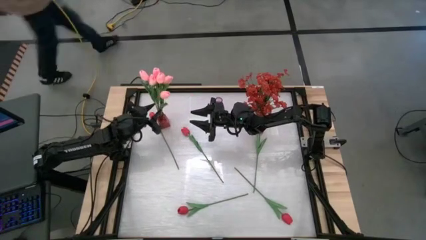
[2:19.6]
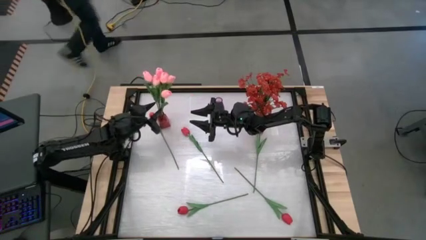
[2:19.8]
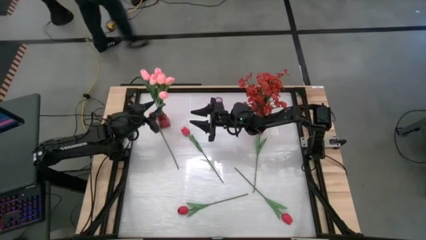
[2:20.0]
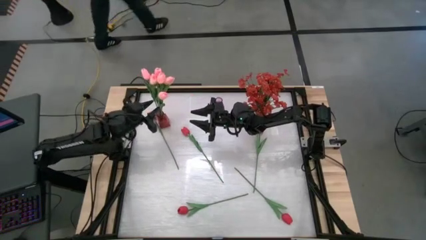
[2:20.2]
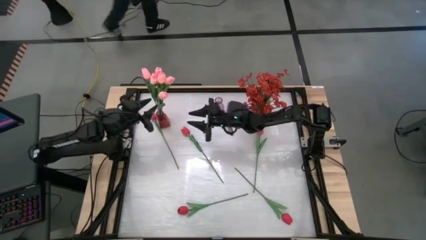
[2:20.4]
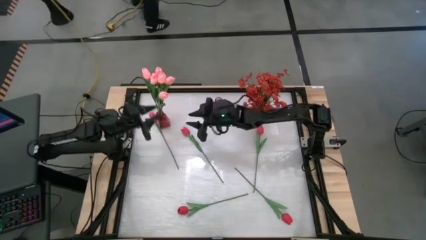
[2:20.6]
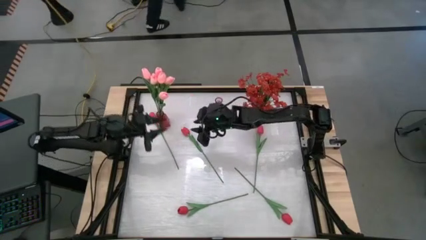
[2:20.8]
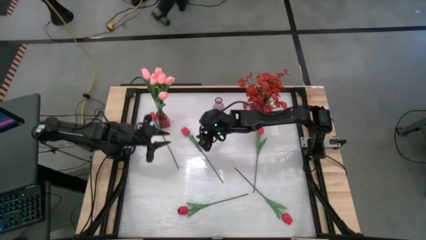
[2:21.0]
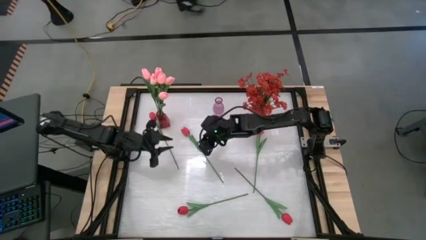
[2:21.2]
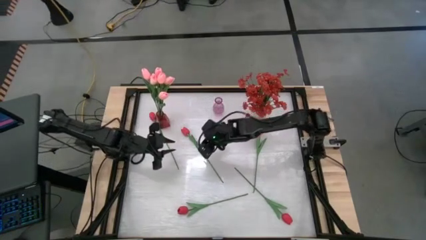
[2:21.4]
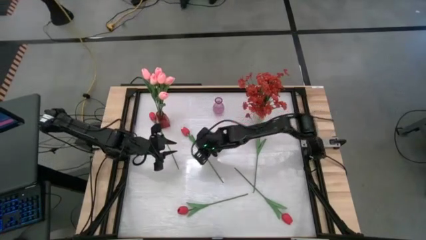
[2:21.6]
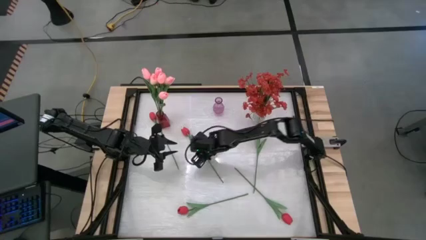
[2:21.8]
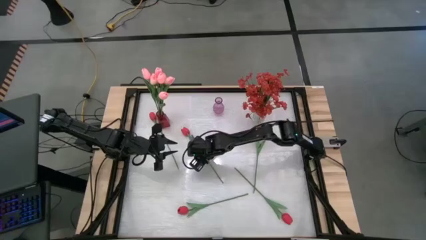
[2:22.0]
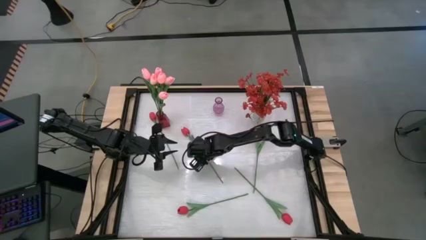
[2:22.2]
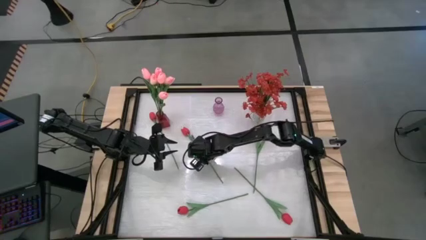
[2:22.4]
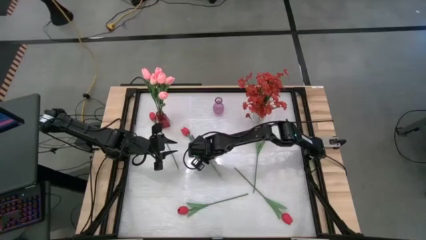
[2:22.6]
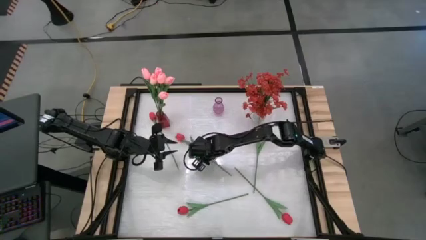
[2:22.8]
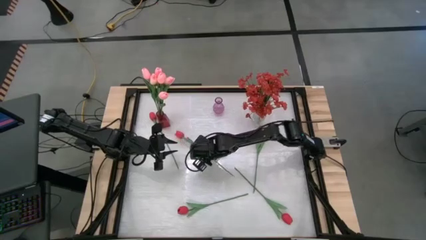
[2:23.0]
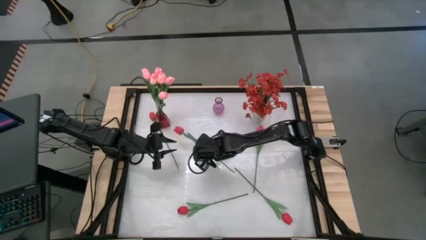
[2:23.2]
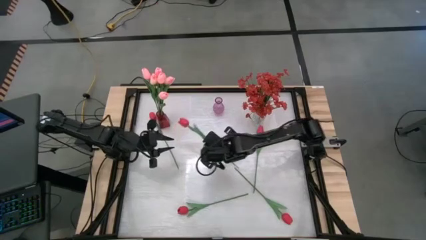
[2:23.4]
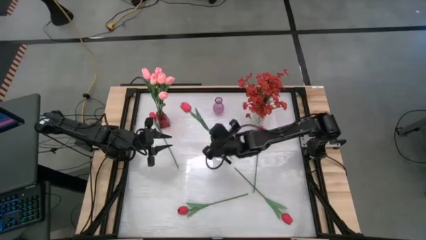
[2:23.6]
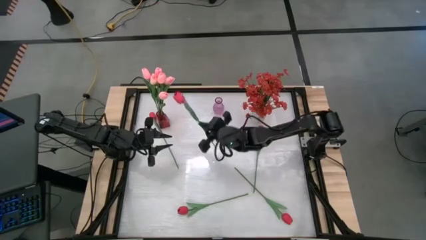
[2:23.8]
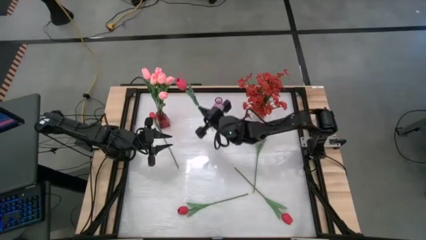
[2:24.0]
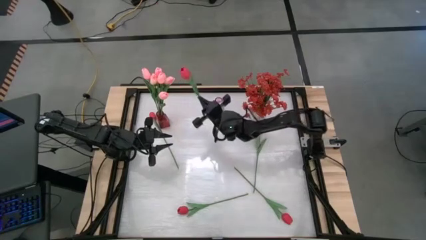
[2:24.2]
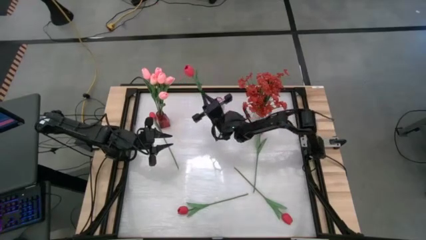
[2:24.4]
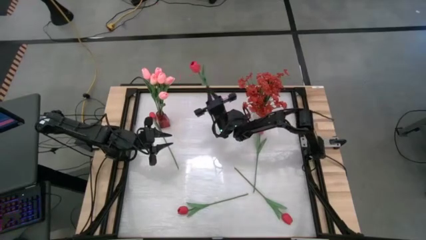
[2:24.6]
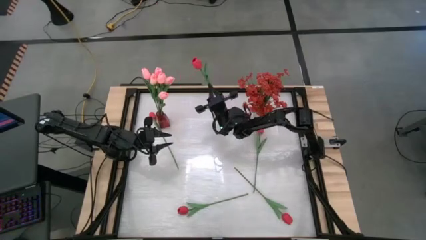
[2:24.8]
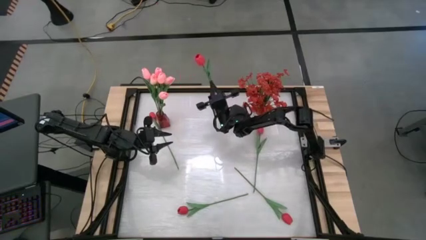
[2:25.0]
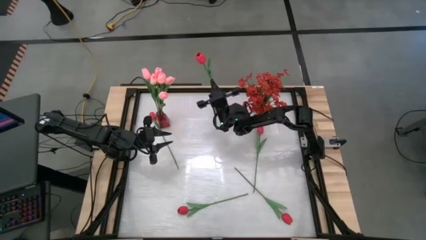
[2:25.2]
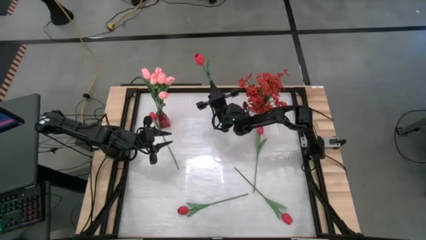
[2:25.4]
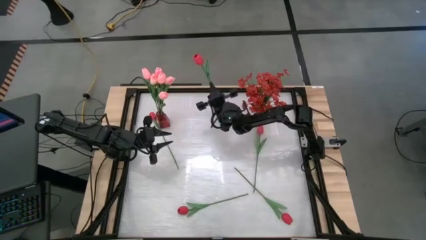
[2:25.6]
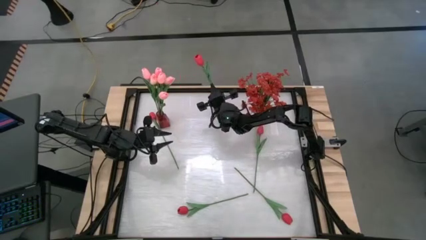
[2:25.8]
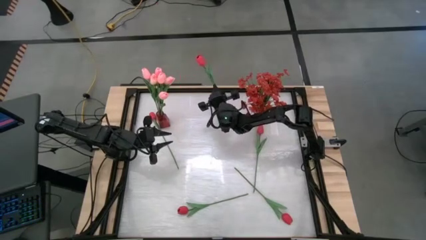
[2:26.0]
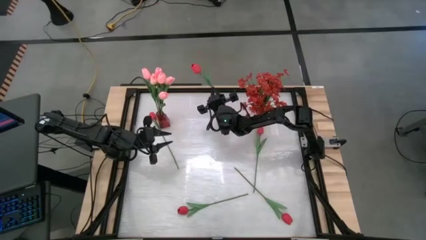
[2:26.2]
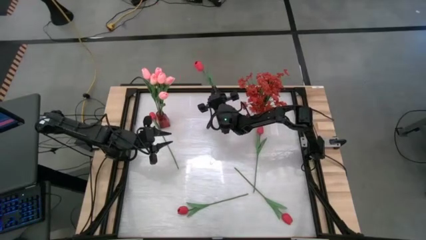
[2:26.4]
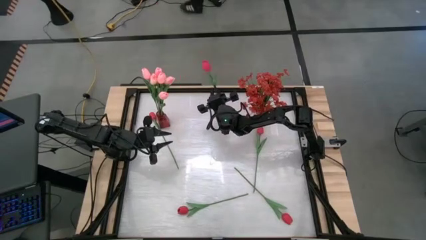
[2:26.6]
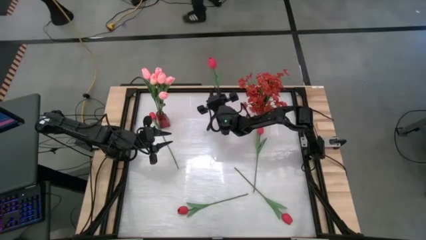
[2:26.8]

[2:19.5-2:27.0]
Task: Sort flowers into vase by color
Put the red tulip into the purple vase

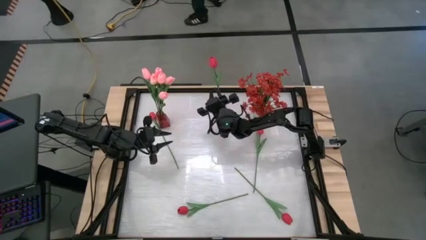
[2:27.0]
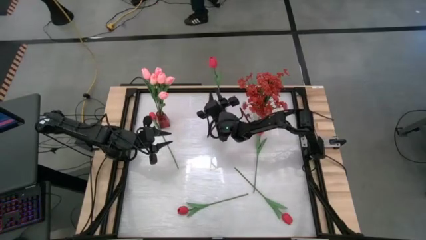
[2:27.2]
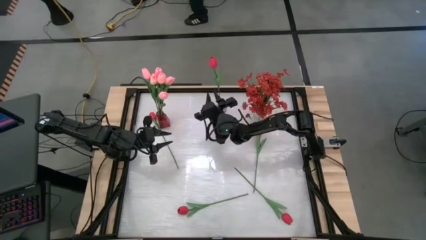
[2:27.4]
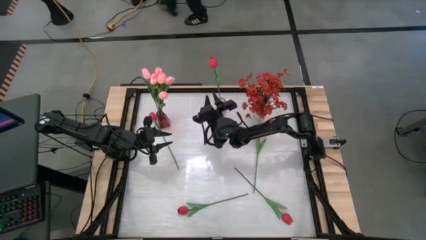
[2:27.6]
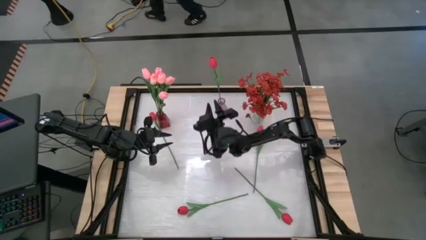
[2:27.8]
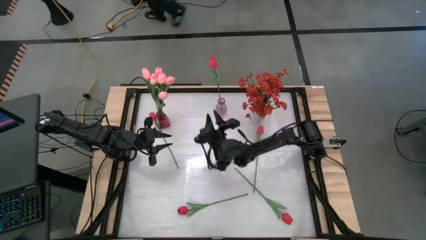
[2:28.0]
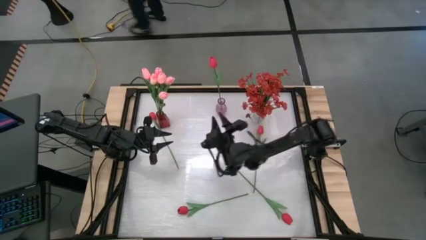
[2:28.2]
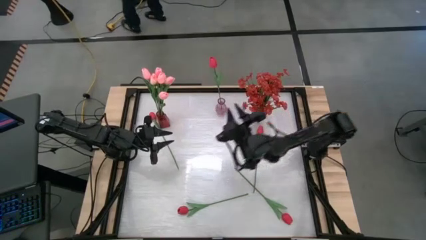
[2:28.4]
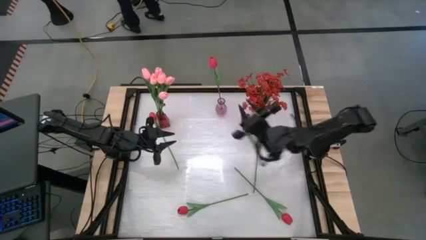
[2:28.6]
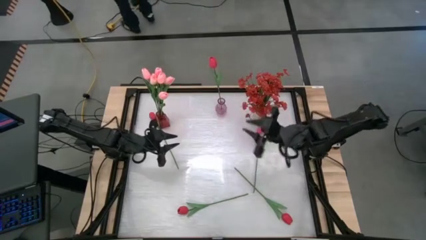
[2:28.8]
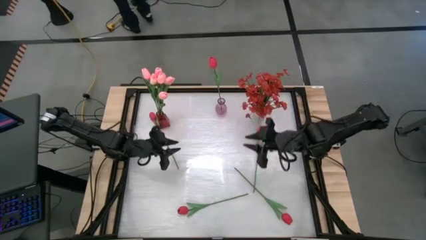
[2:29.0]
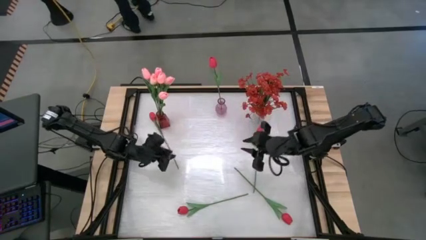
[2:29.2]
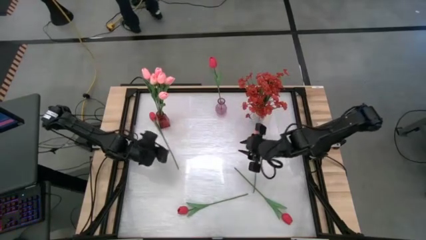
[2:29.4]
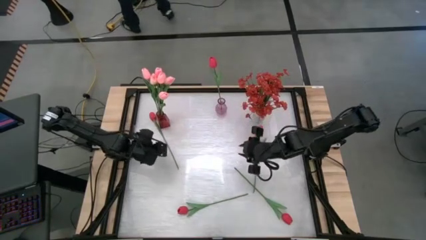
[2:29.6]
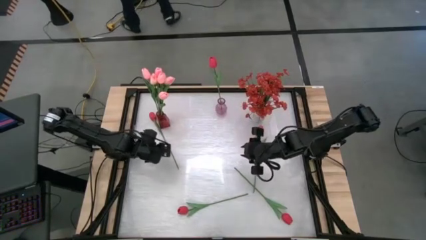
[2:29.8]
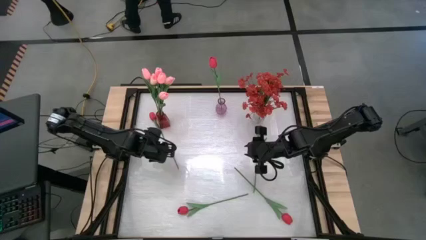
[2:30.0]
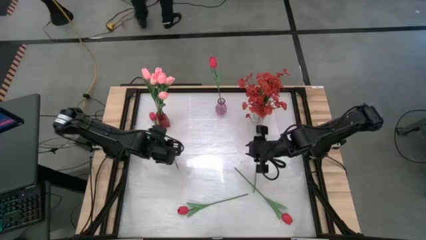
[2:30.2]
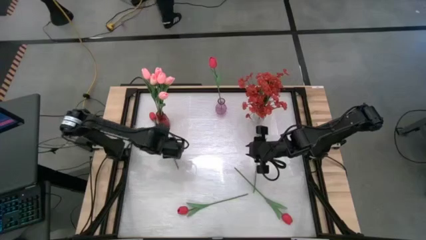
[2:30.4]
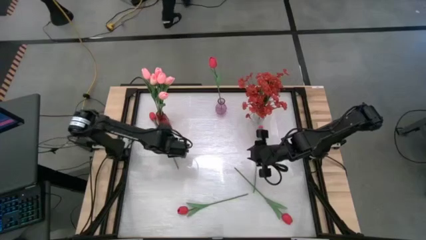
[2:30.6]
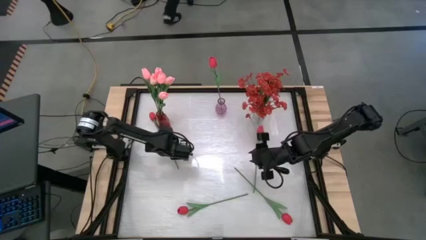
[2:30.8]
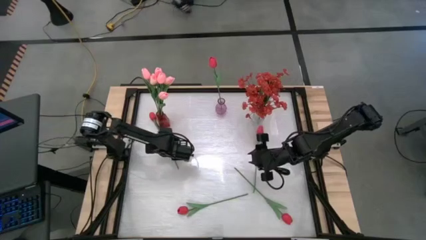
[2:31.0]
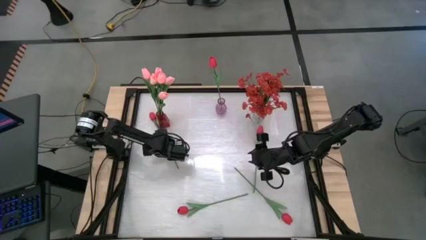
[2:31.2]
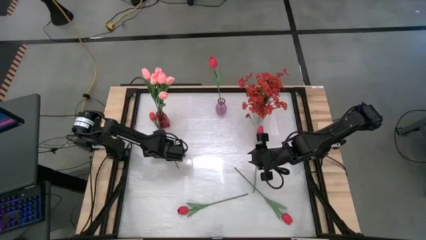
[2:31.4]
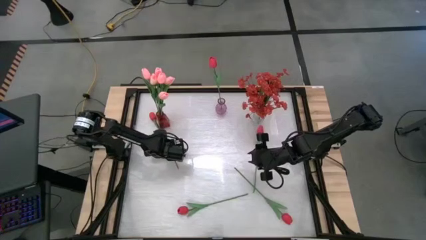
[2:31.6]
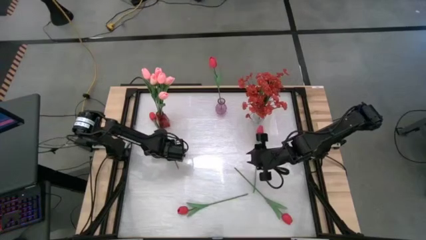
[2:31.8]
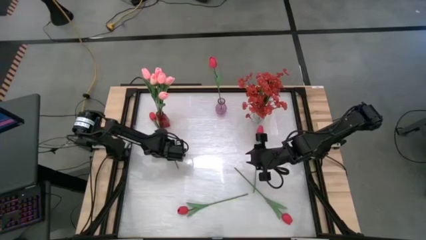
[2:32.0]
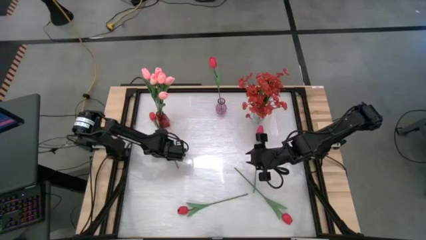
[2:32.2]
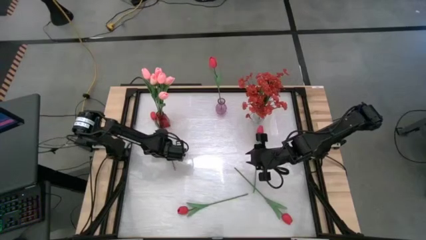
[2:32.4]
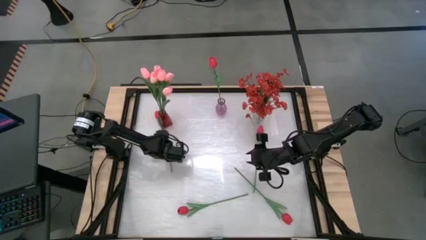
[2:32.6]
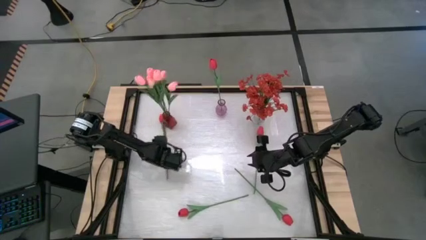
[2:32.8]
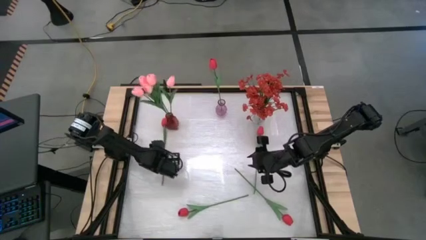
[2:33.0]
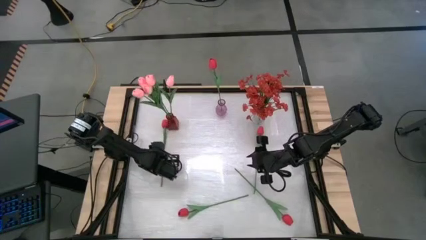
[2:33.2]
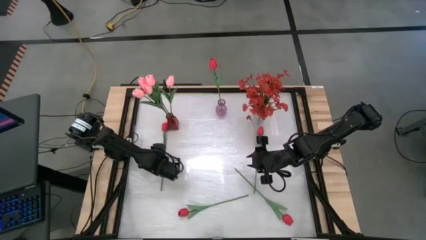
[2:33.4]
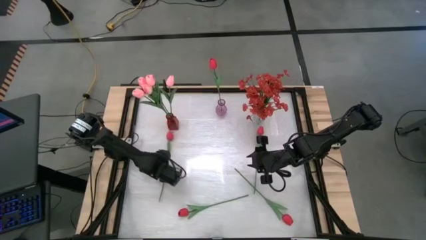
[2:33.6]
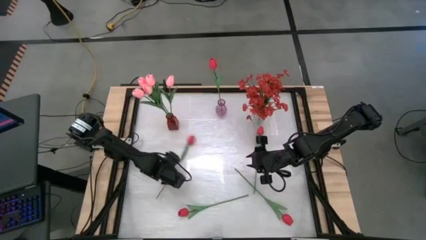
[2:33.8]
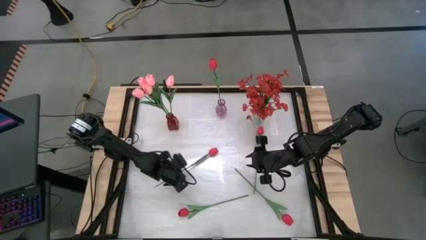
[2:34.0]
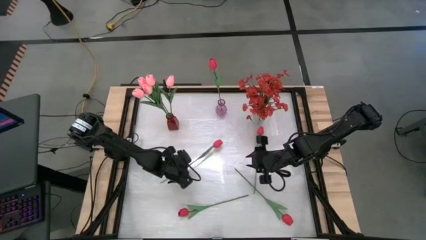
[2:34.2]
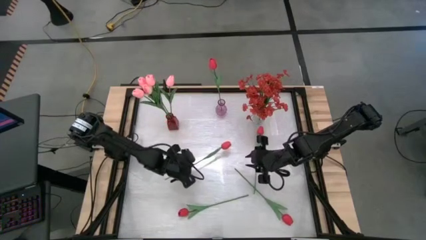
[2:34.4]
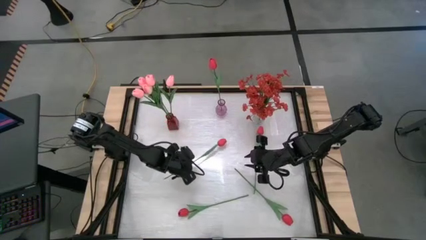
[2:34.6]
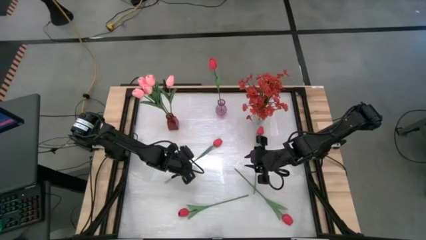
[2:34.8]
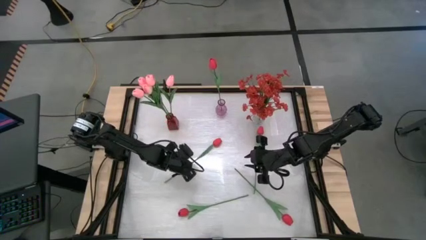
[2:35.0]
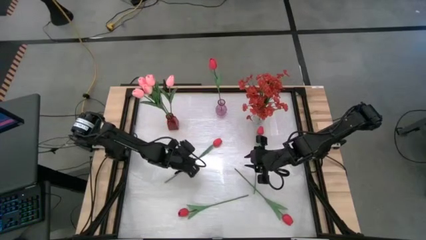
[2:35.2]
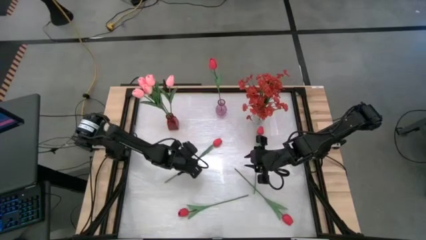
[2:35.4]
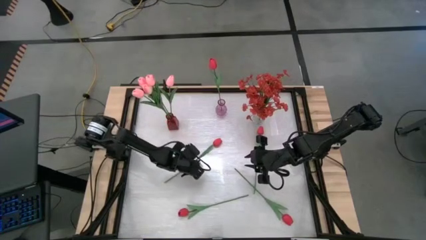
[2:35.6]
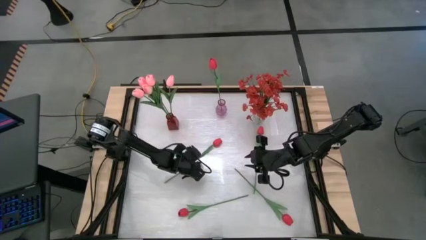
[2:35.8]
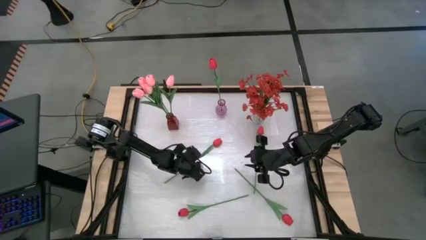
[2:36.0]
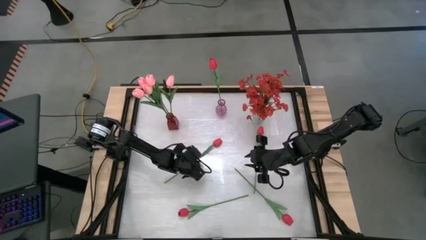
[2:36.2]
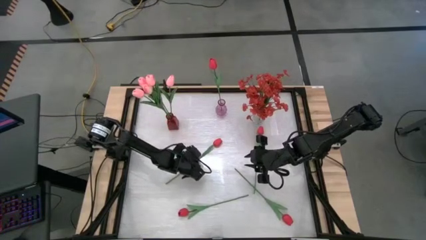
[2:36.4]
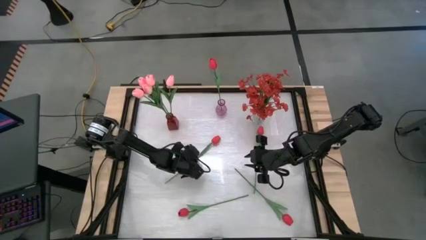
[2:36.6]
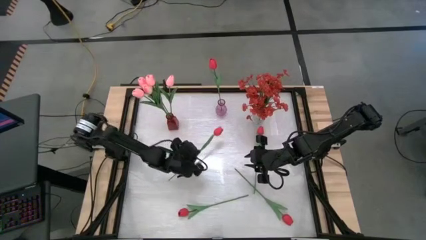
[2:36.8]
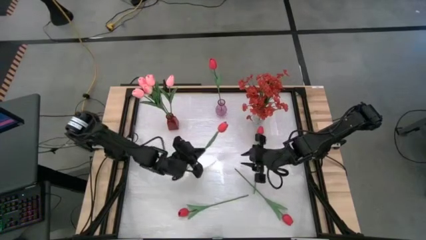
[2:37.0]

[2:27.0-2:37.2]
Put the red tulip into the purple vase
